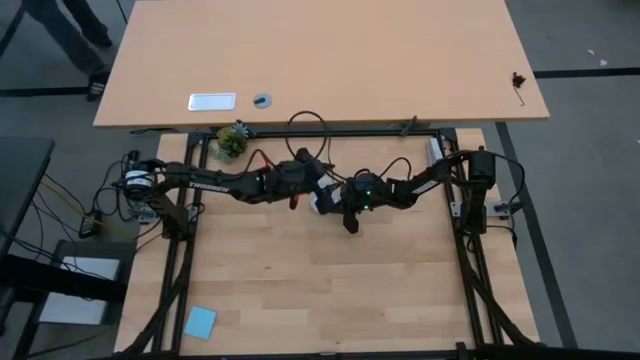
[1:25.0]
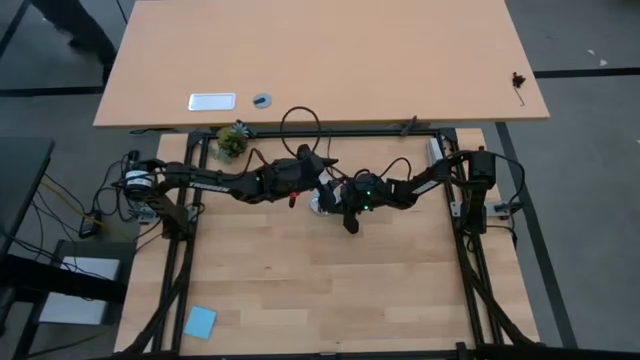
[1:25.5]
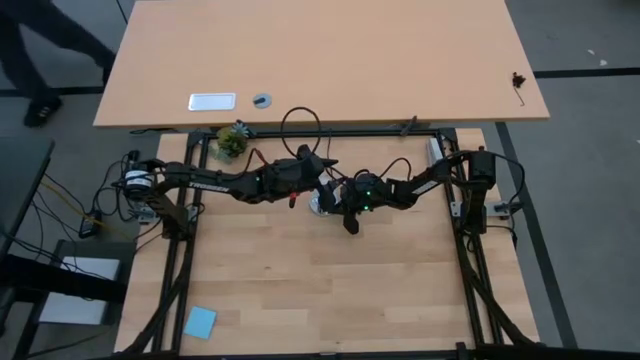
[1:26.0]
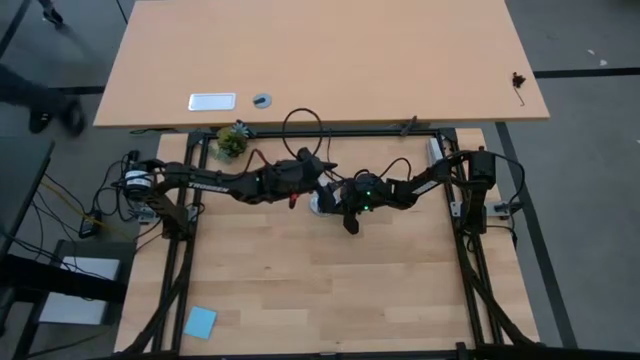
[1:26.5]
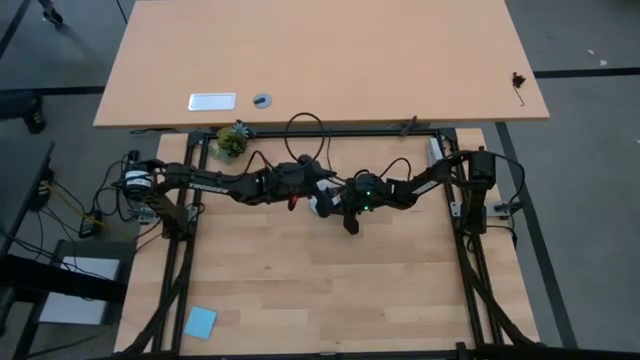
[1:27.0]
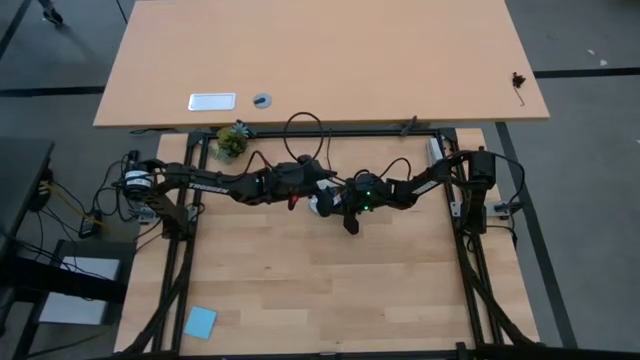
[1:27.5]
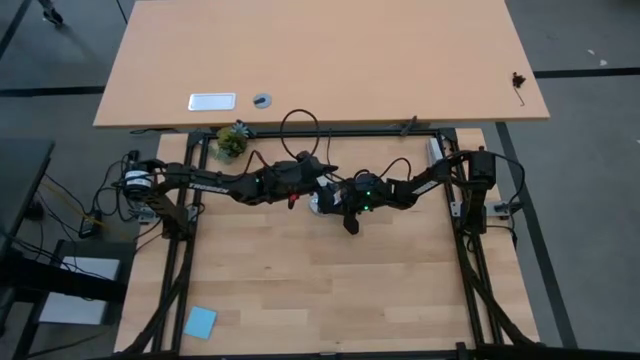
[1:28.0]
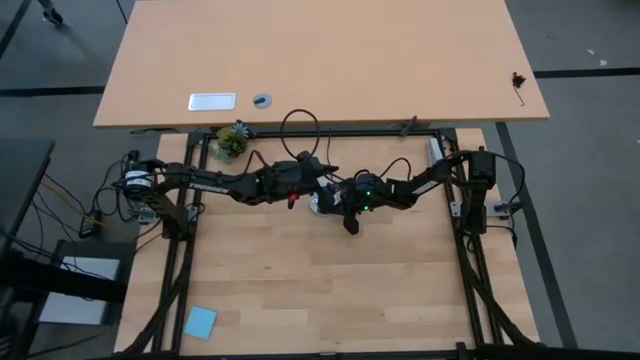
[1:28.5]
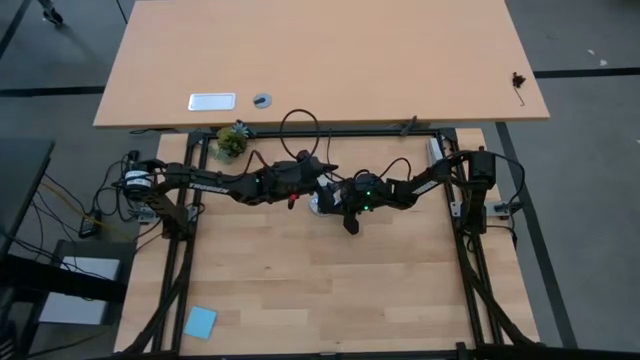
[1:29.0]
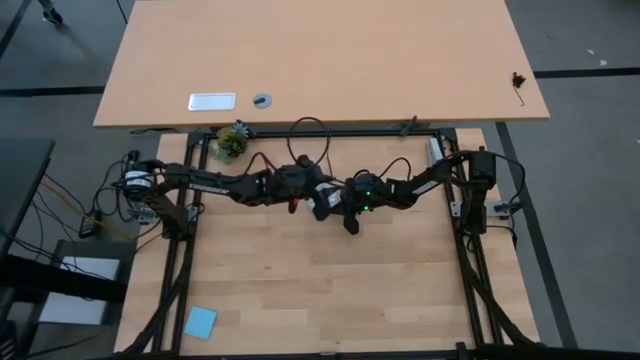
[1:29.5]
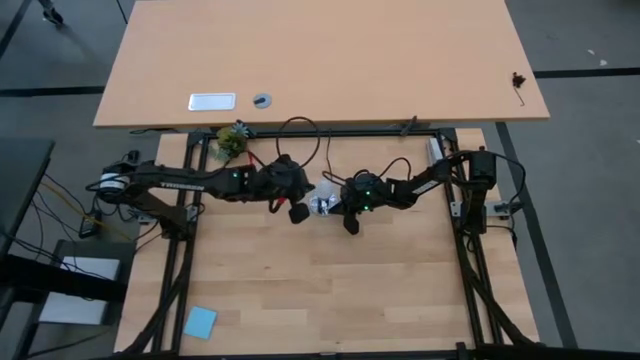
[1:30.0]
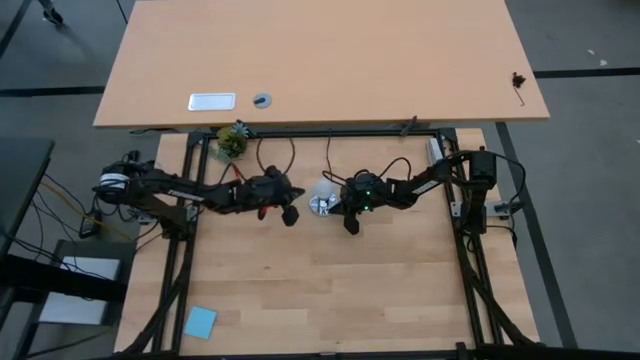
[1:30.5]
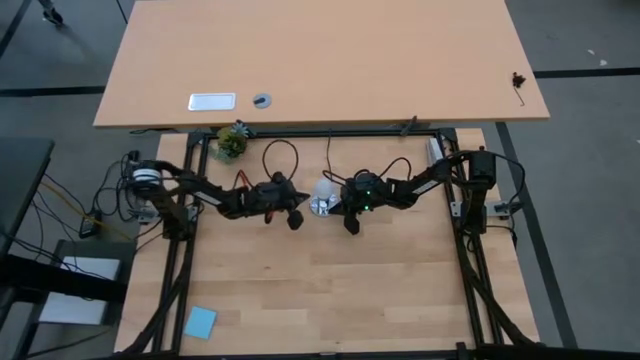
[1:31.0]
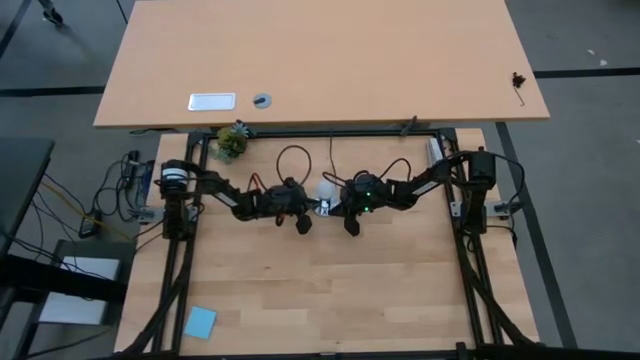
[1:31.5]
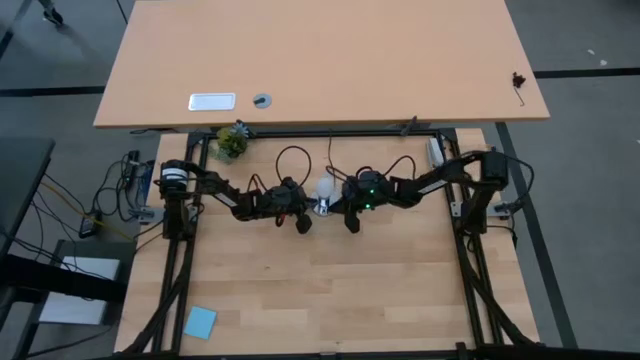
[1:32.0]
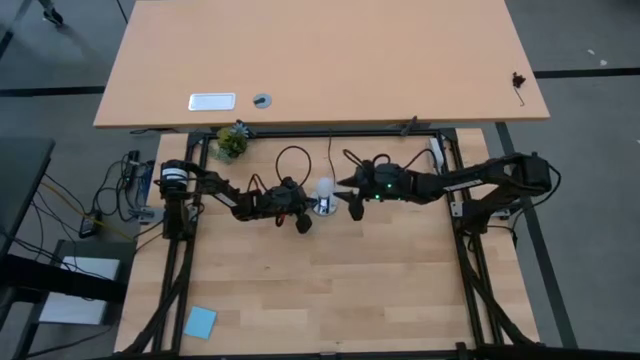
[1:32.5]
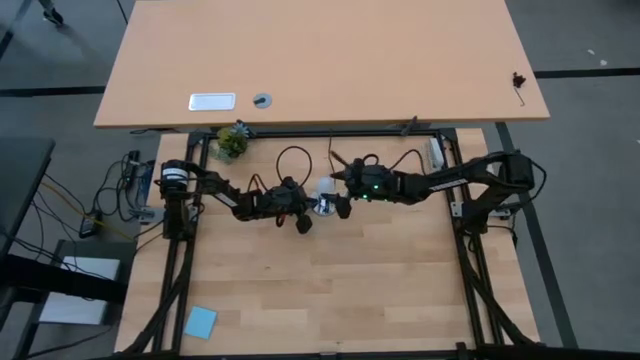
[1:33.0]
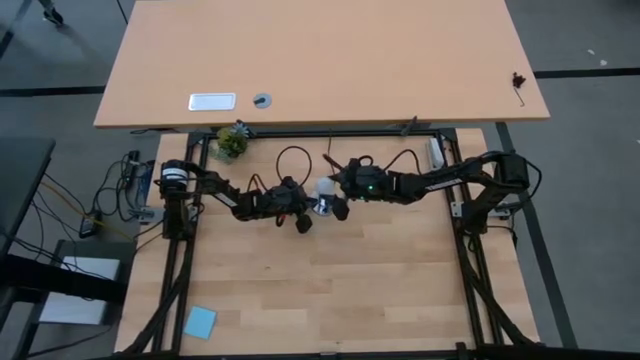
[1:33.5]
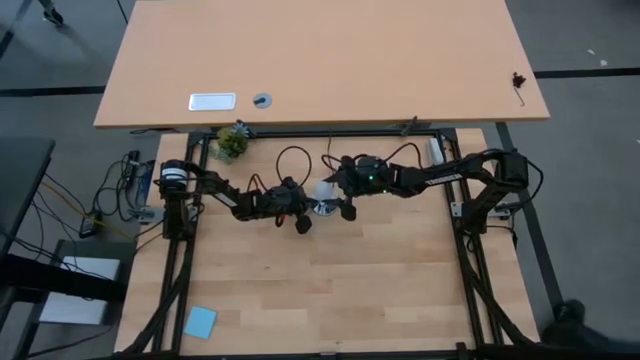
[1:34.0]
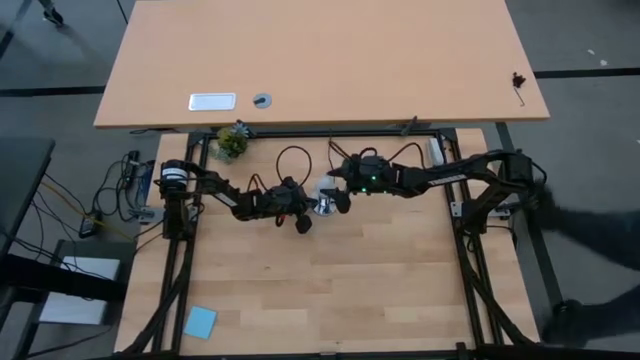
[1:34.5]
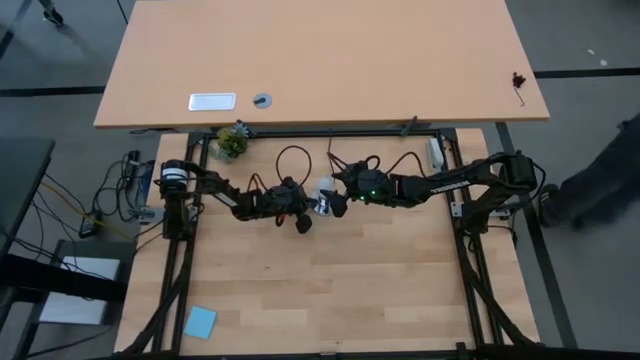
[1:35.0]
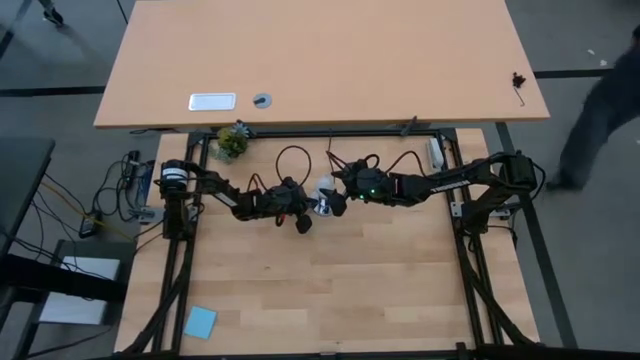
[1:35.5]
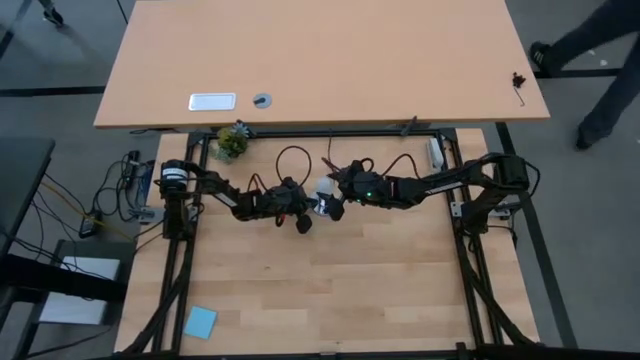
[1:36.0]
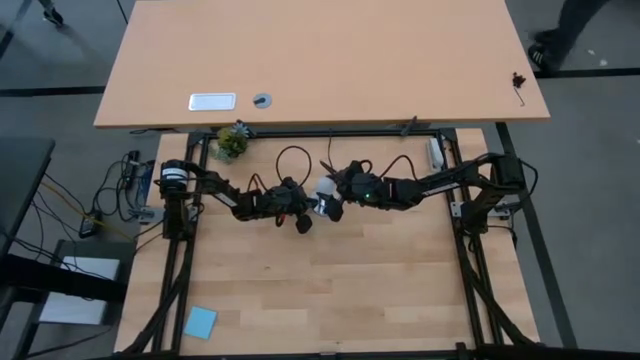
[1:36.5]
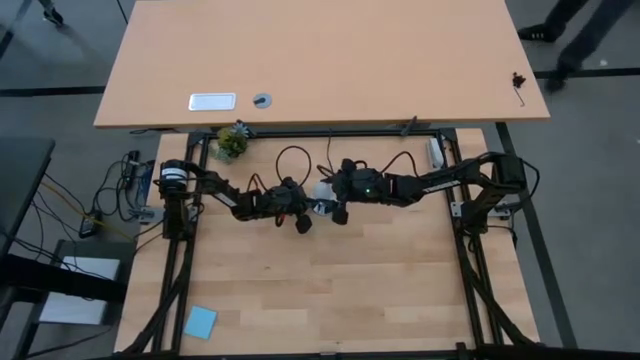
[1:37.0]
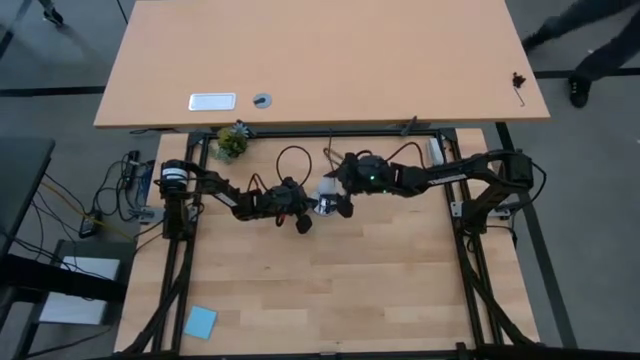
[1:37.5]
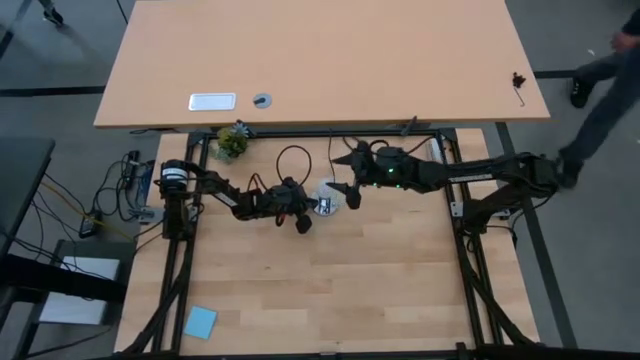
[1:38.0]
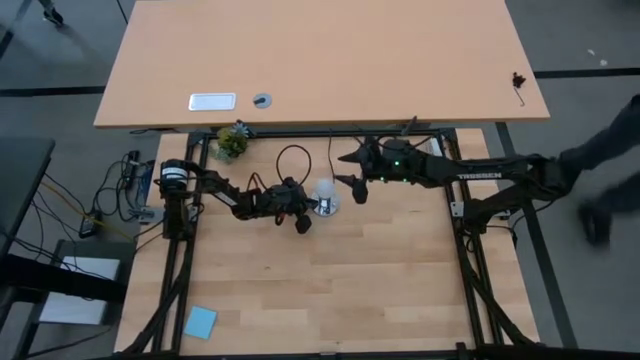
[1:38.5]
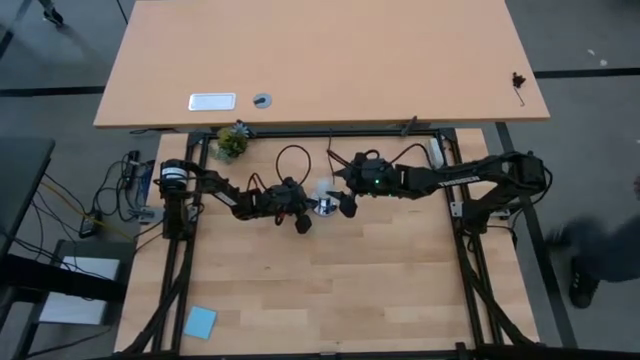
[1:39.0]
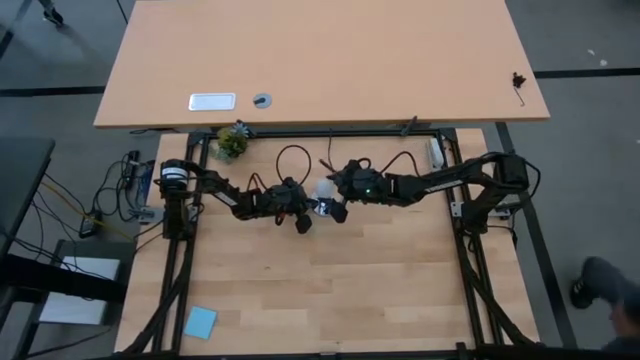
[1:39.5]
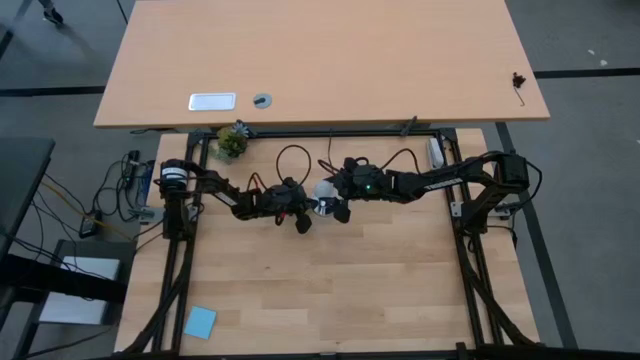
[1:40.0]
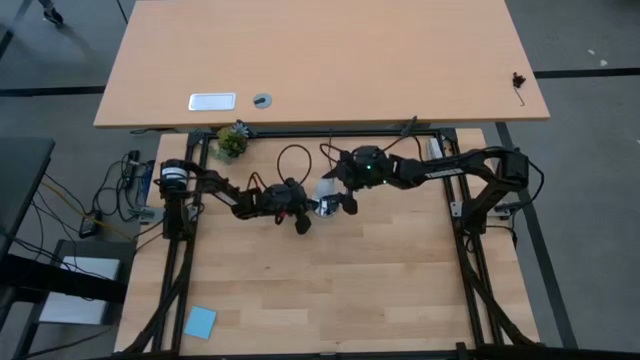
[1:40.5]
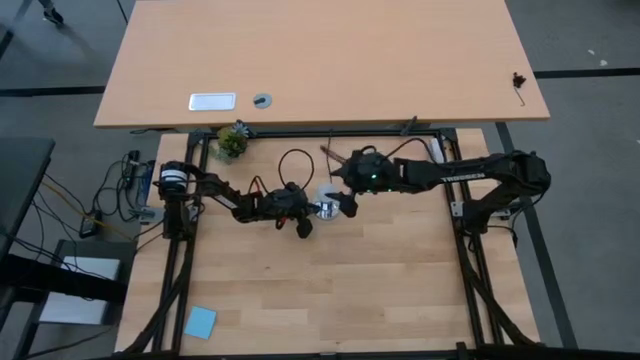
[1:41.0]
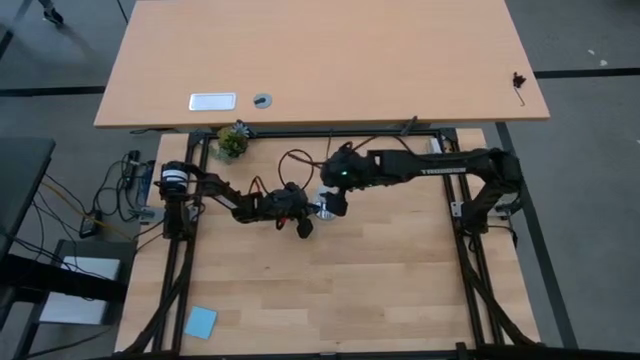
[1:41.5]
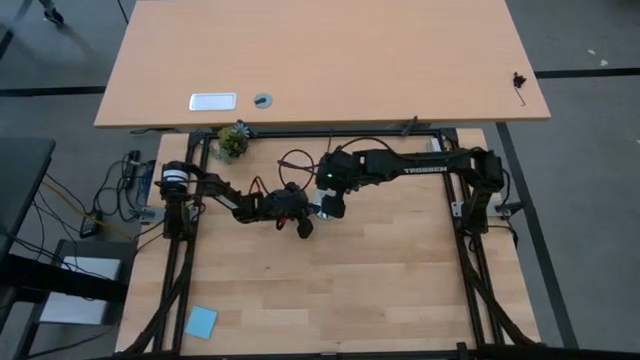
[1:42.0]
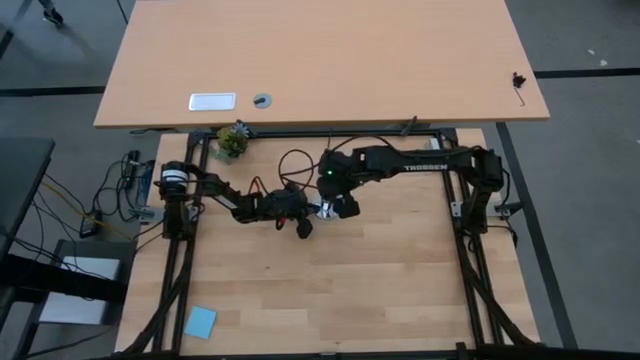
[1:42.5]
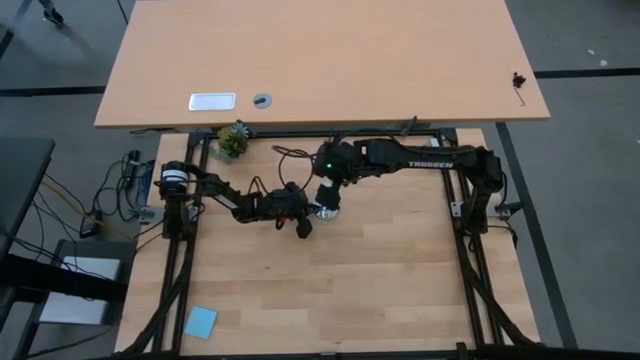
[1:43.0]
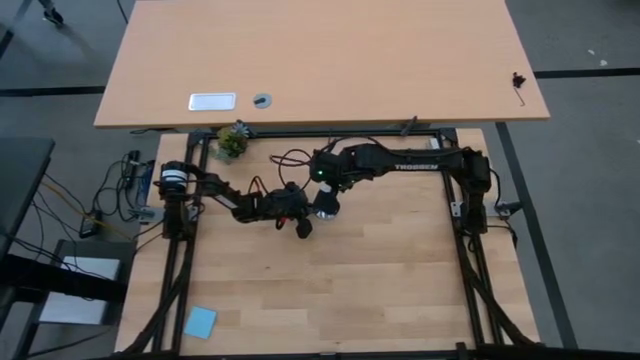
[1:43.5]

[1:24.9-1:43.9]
Task: Screw lightbulb
Remove the lightbulb from the lamp
